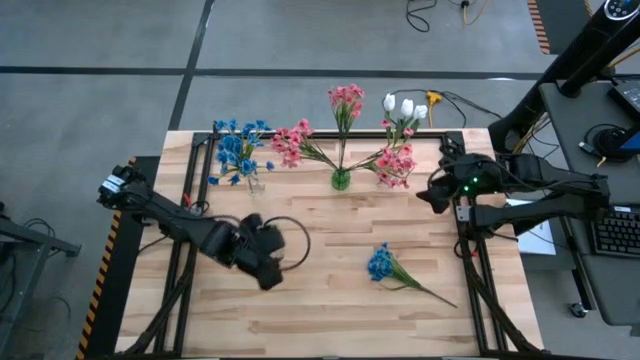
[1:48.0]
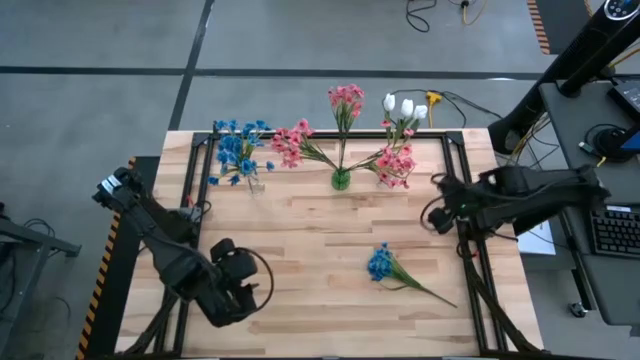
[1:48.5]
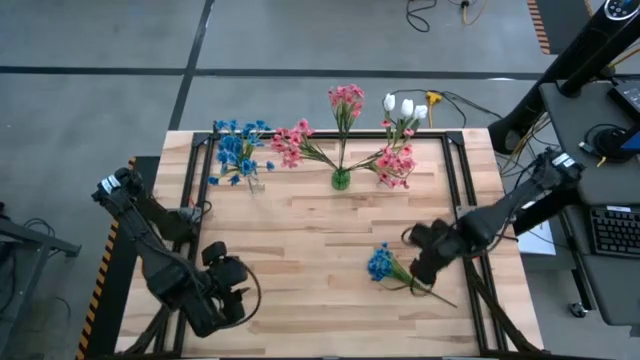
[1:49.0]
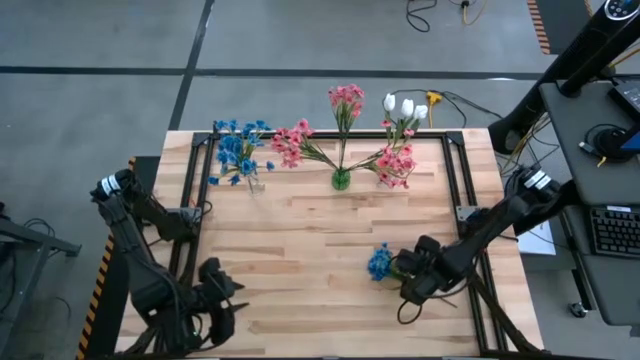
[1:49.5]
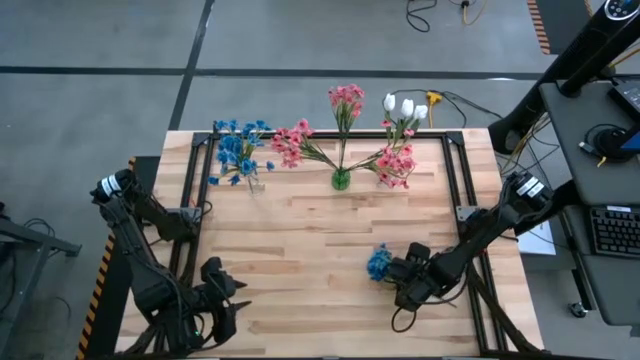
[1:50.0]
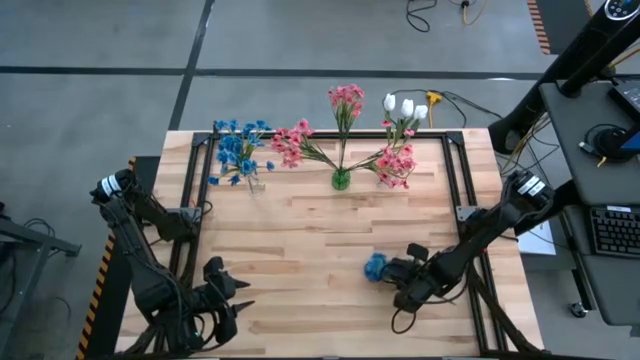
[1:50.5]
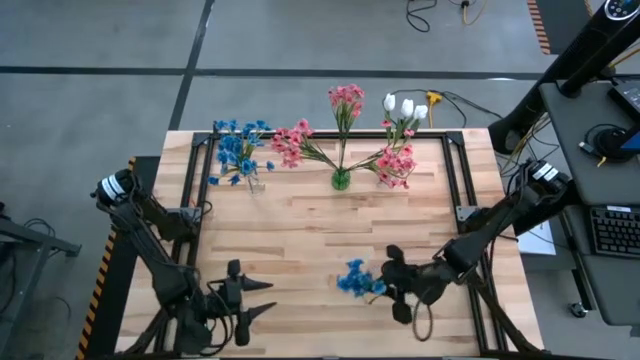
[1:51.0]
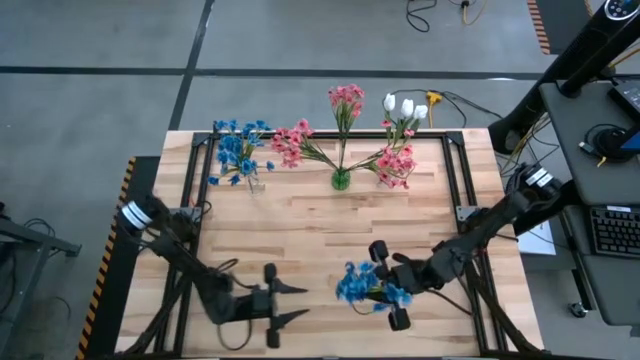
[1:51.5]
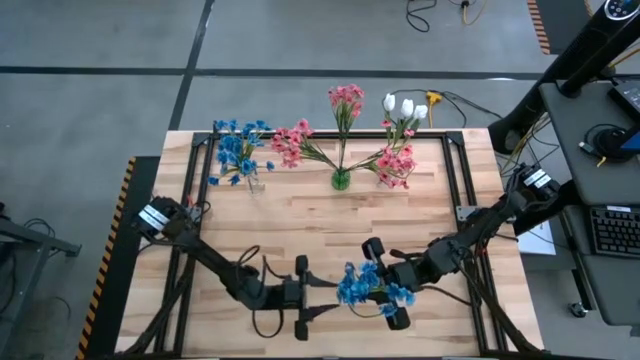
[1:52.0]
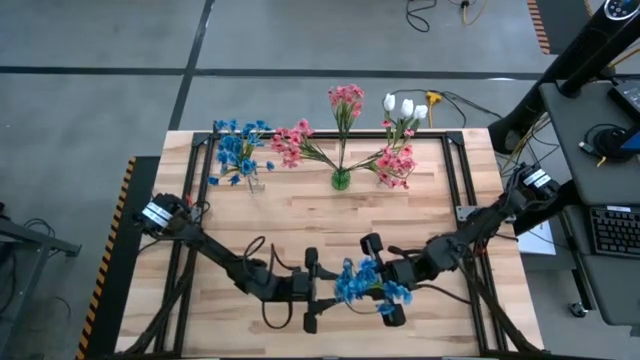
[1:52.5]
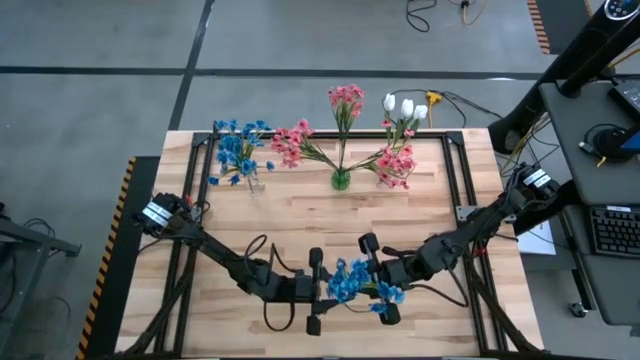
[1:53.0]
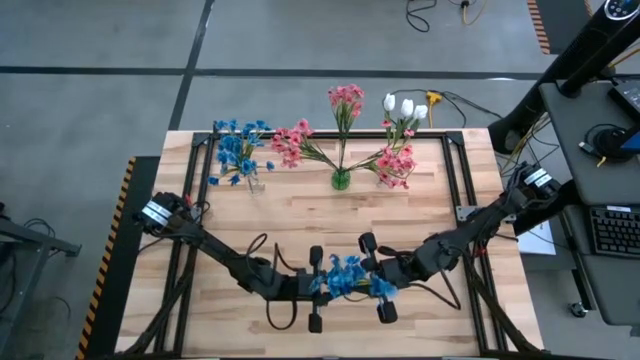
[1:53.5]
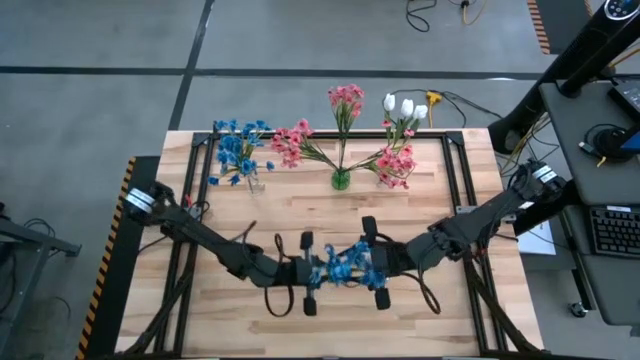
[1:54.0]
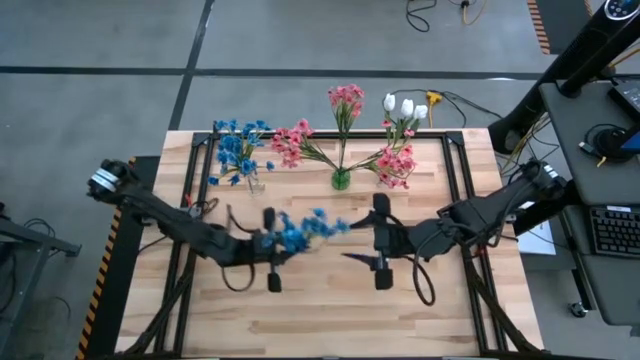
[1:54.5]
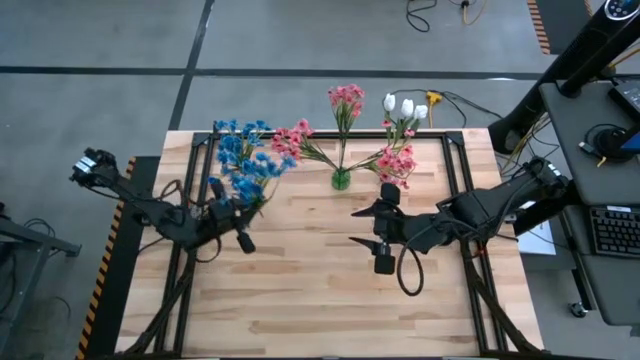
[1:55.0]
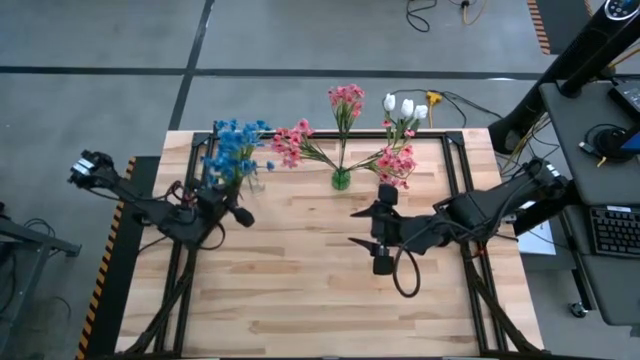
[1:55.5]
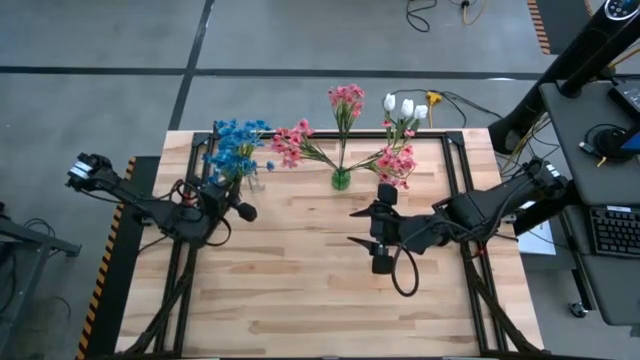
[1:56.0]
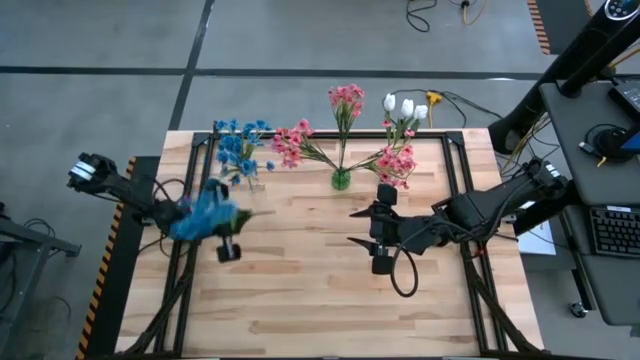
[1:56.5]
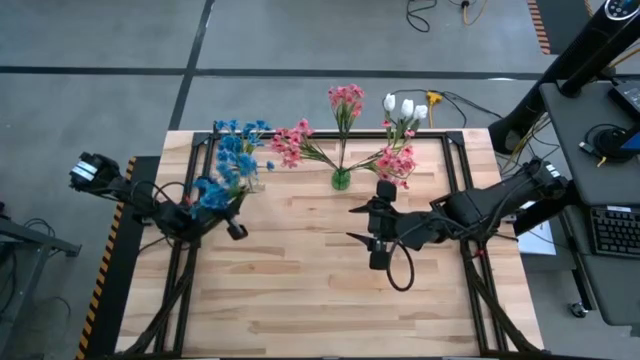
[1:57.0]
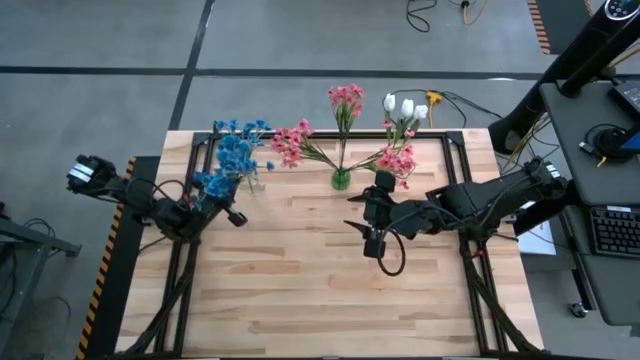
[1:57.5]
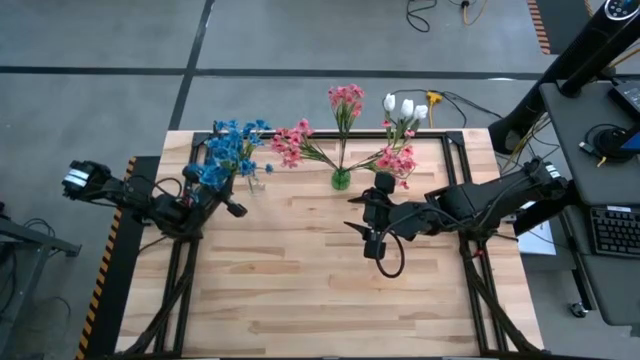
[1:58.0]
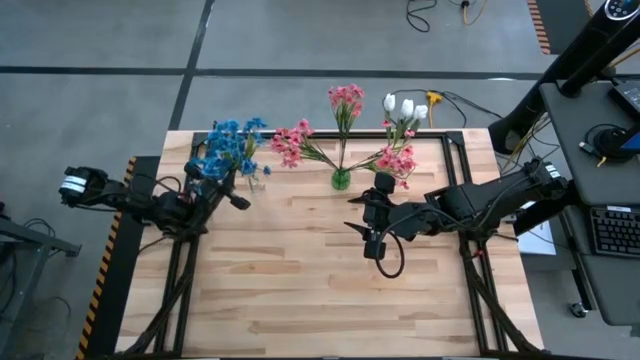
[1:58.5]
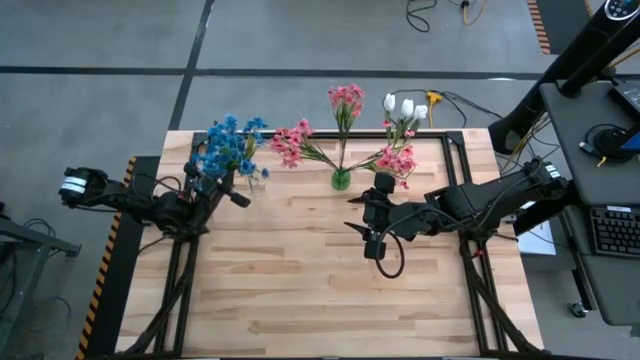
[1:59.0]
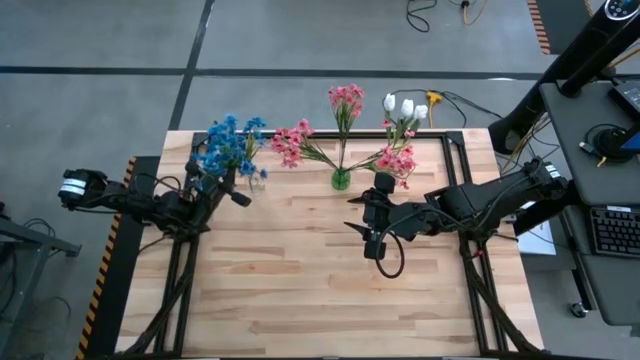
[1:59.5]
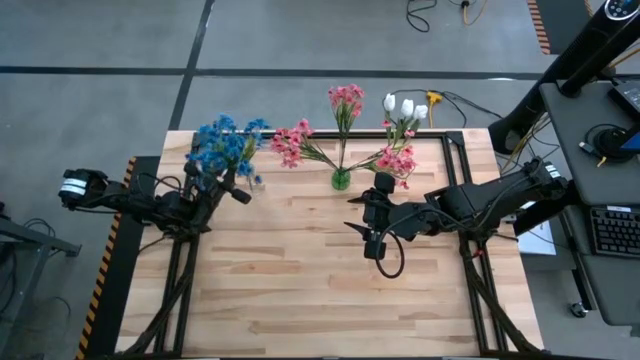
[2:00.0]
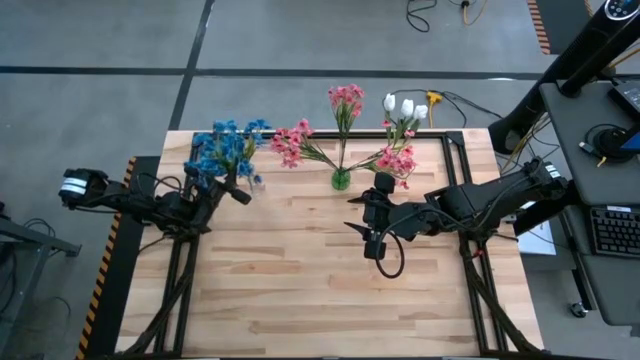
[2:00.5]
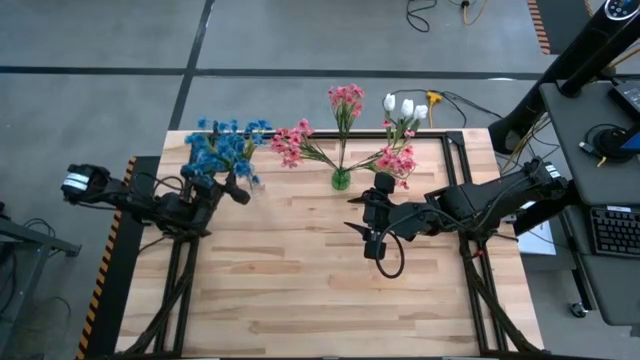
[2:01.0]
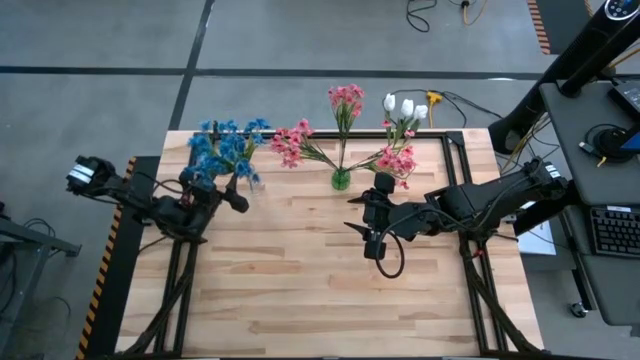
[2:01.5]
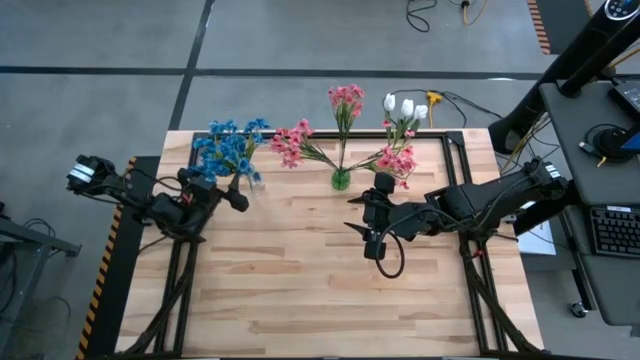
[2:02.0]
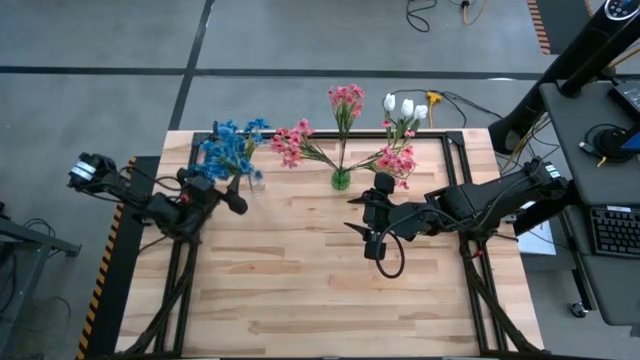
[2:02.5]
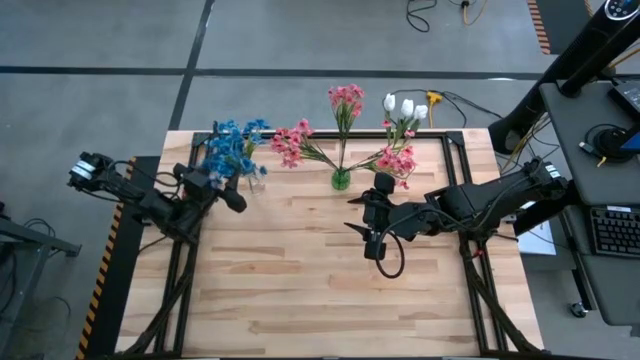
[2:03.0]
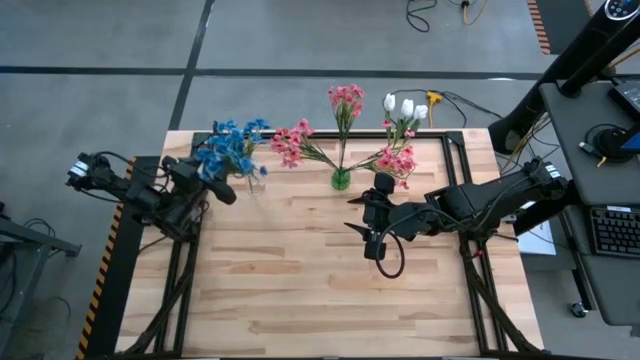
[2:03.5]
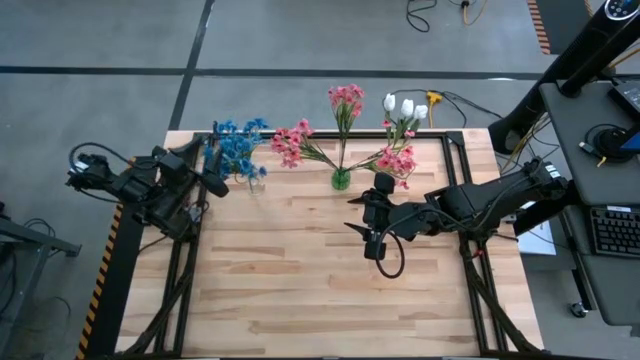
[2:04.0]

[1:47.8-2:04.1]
Task: Sort flowers into vase by color
Put the blue flowers into the left transparent vase

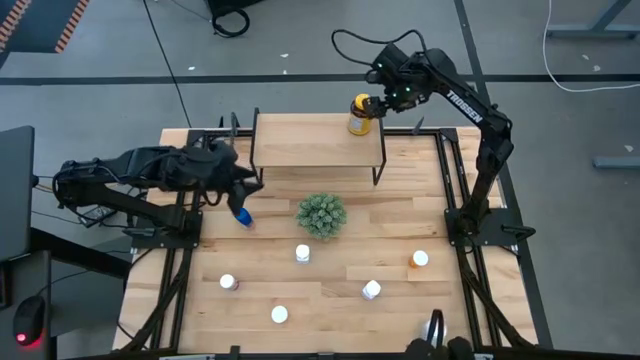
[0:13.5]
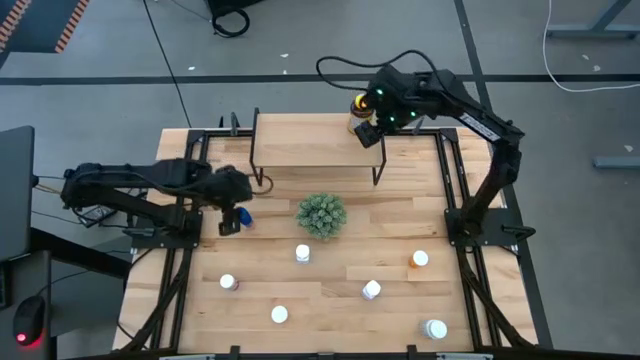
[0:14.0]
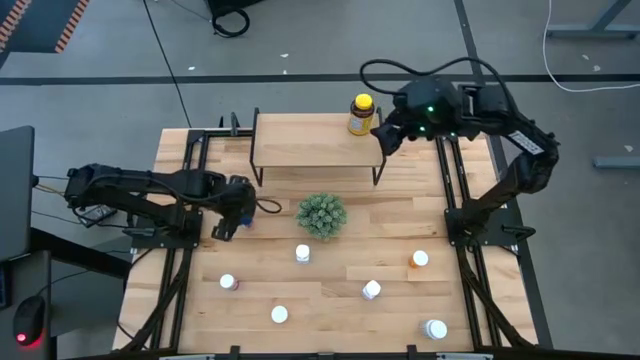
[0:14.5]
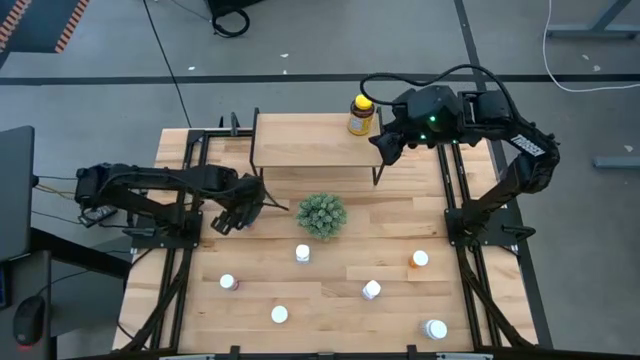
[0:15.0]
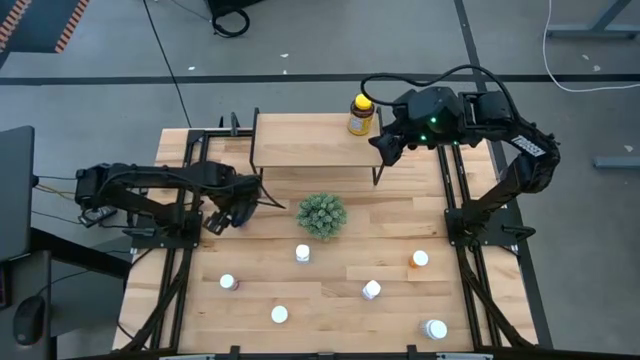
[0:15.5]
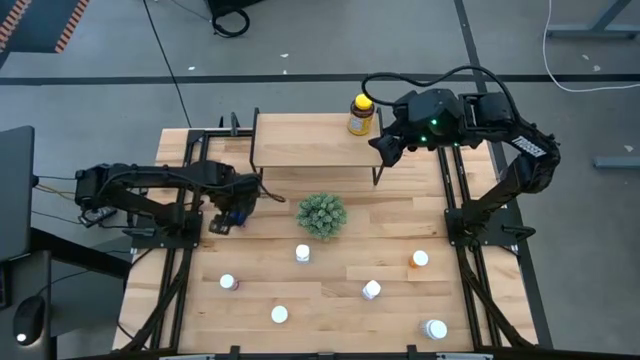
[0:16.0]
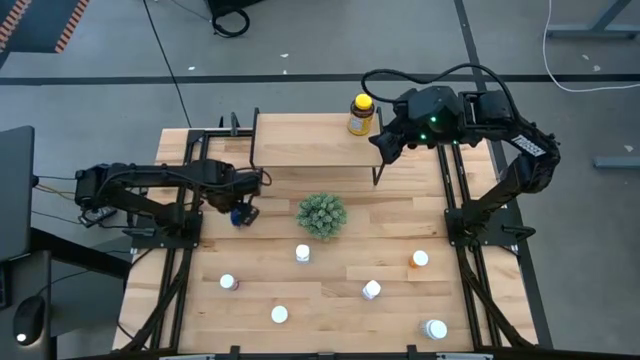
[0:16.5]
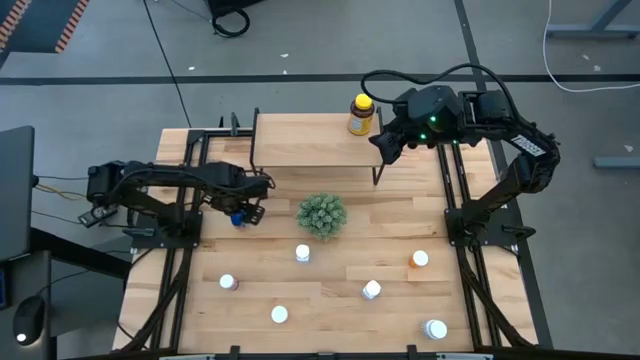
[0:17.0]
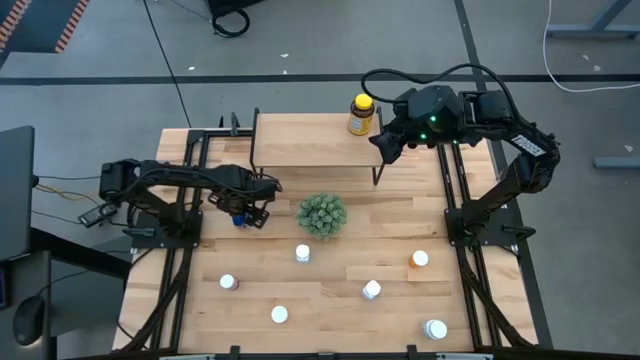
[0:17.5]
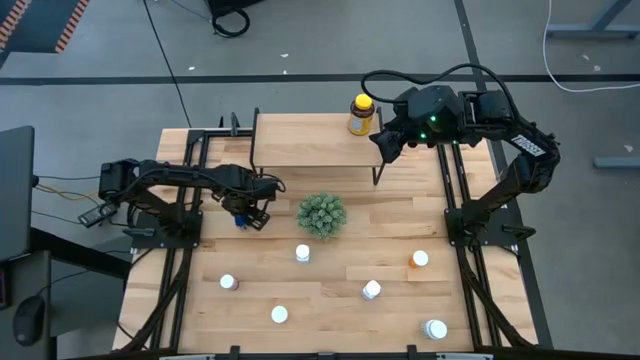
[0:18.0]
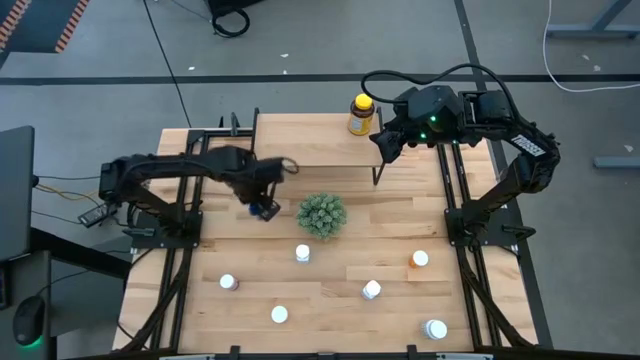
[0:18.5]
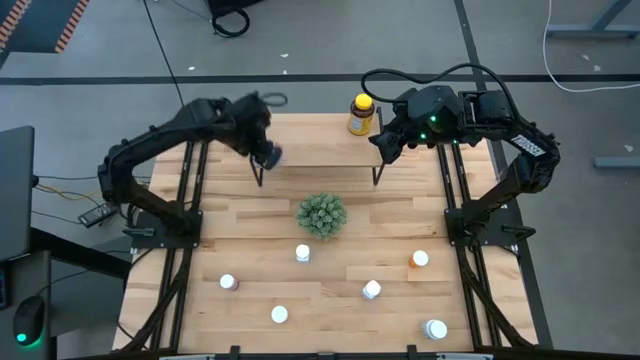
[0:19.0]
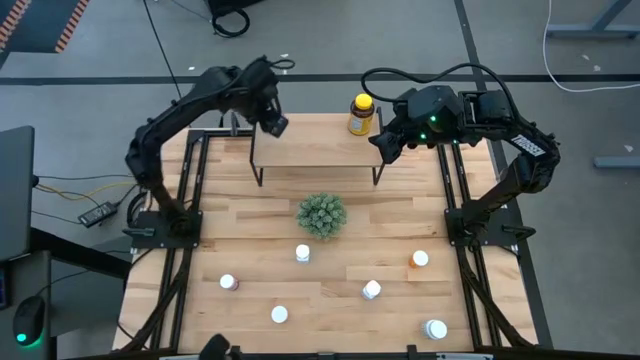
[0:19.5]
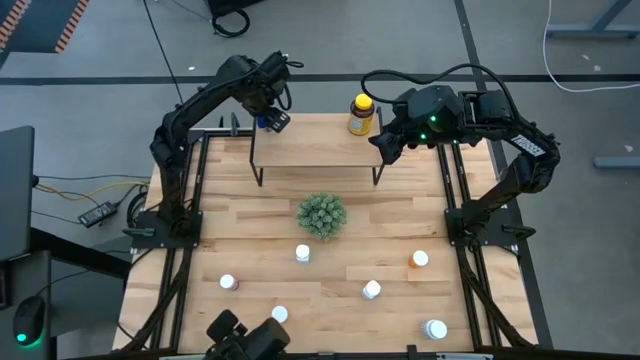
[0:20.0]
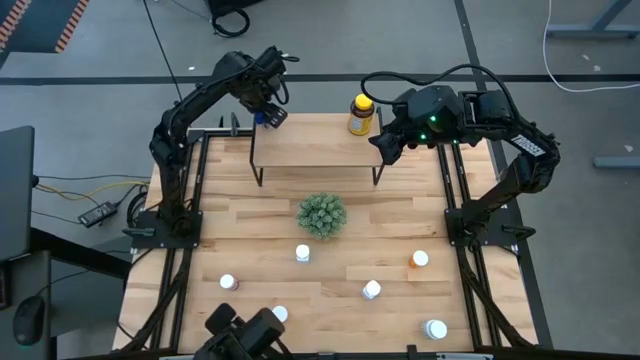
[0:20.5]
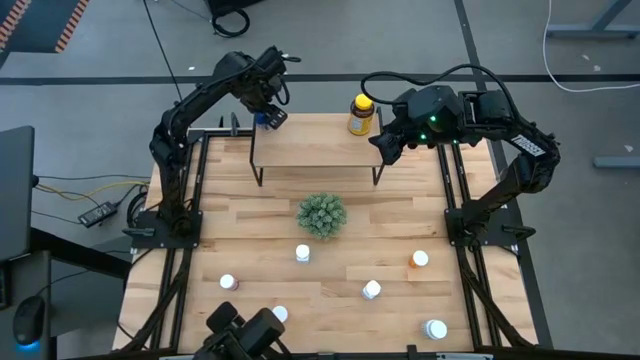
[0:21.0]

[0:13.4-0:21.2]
Task: Pick and place medicine bottles onto shelf by color
Put the blue medicine bottle on the shelf
